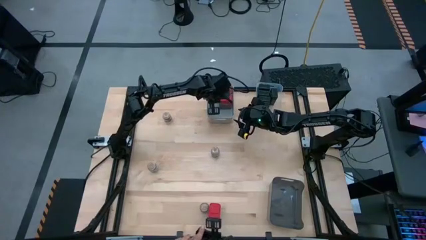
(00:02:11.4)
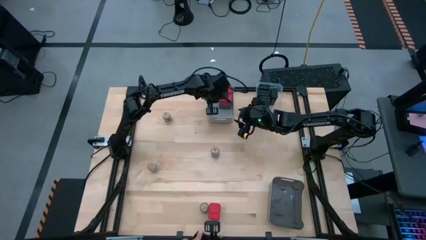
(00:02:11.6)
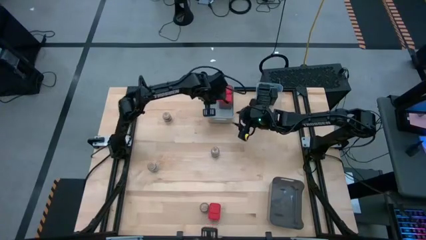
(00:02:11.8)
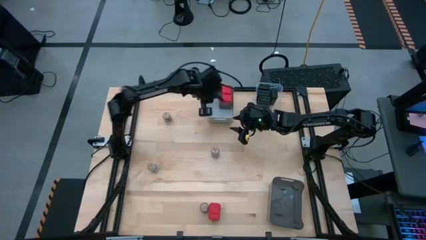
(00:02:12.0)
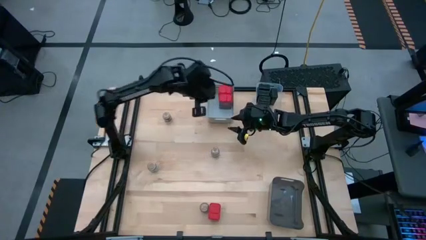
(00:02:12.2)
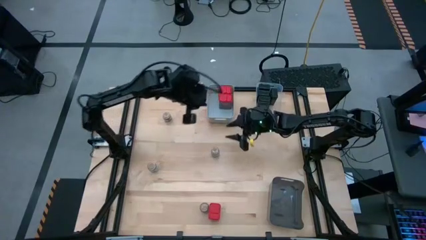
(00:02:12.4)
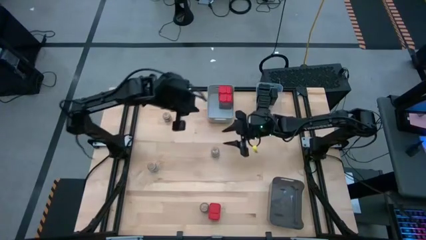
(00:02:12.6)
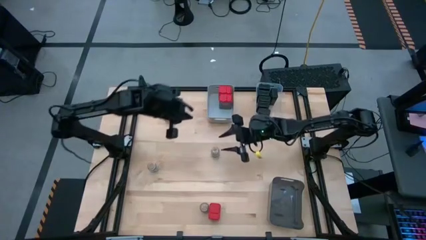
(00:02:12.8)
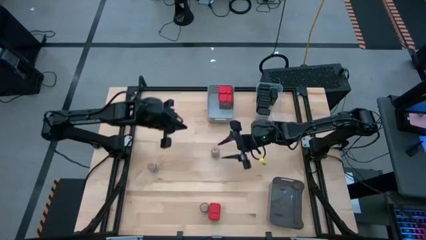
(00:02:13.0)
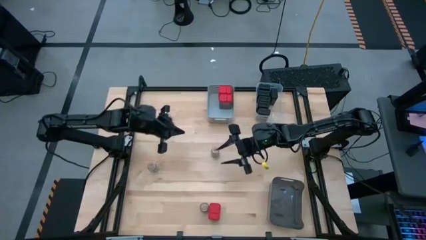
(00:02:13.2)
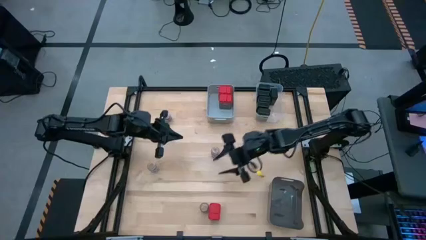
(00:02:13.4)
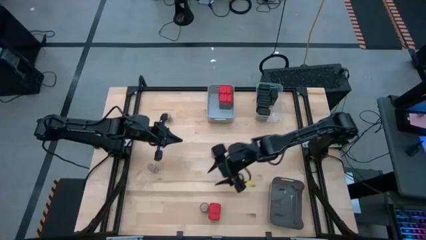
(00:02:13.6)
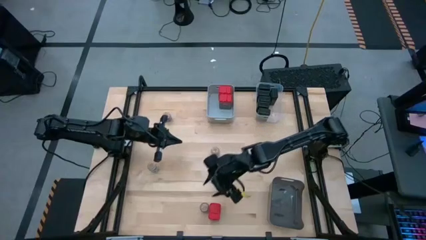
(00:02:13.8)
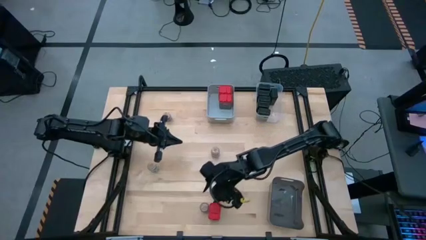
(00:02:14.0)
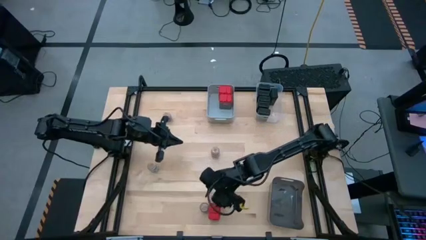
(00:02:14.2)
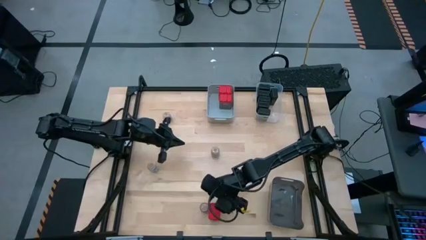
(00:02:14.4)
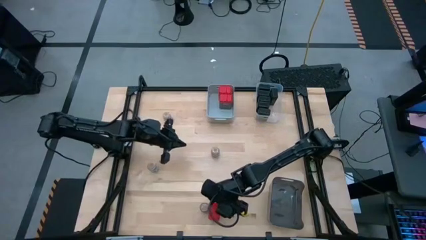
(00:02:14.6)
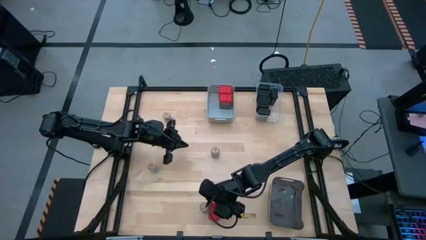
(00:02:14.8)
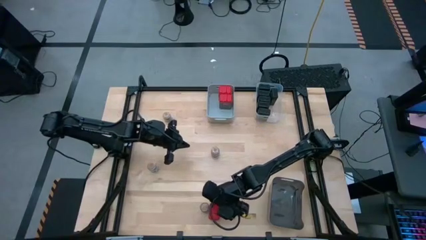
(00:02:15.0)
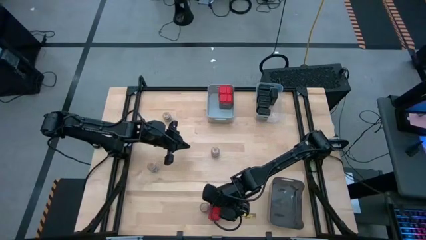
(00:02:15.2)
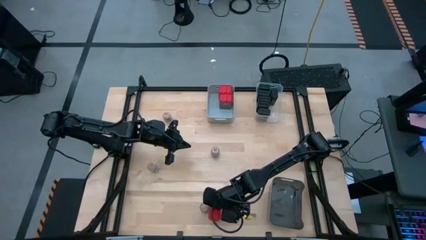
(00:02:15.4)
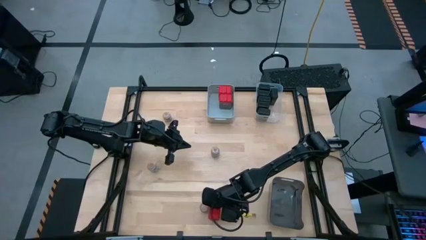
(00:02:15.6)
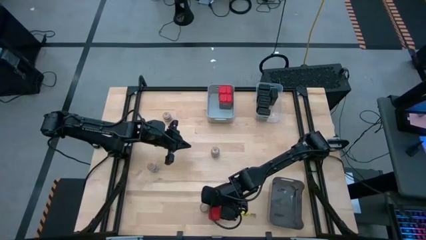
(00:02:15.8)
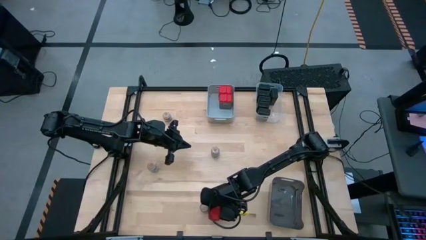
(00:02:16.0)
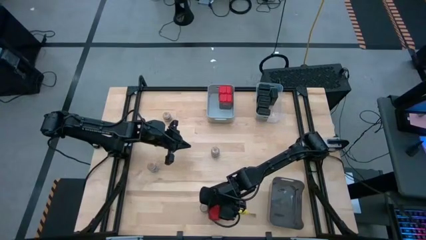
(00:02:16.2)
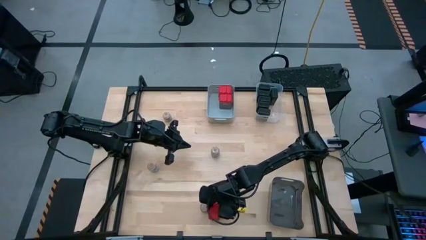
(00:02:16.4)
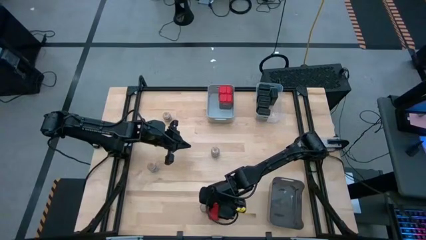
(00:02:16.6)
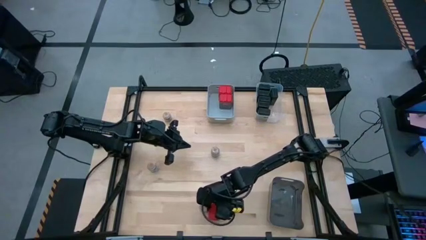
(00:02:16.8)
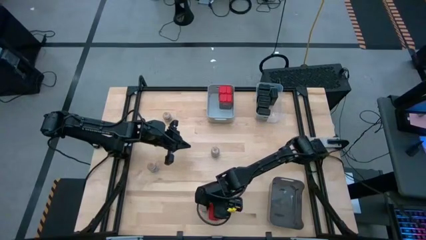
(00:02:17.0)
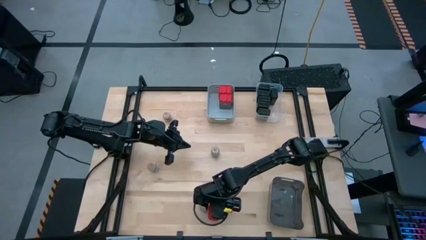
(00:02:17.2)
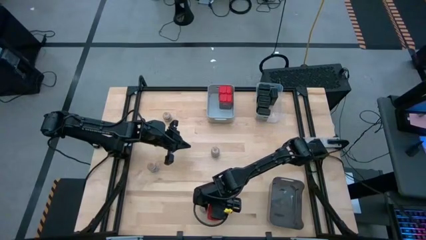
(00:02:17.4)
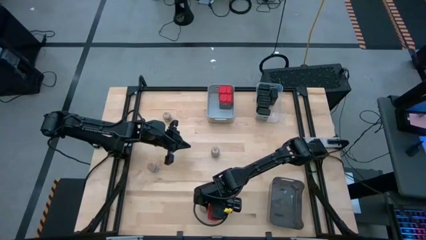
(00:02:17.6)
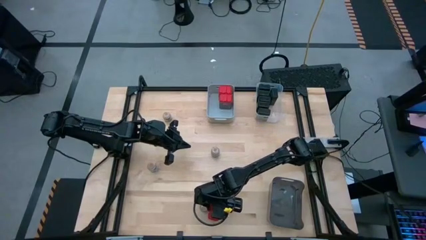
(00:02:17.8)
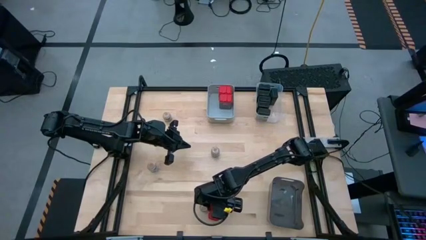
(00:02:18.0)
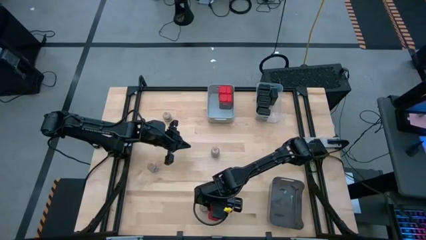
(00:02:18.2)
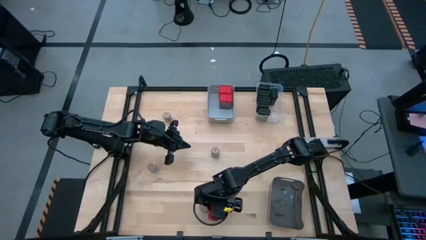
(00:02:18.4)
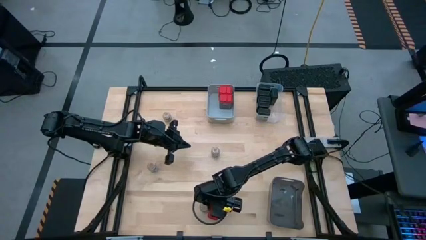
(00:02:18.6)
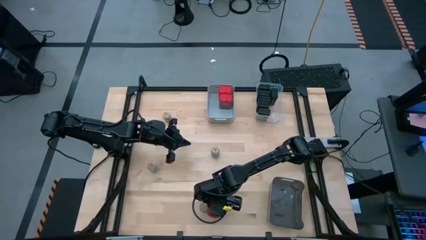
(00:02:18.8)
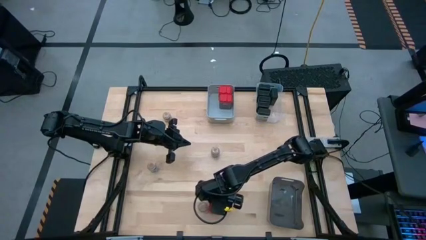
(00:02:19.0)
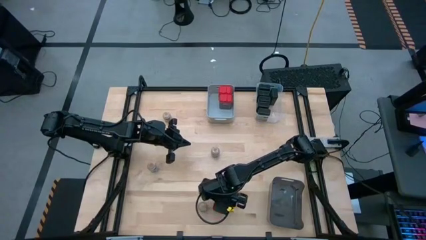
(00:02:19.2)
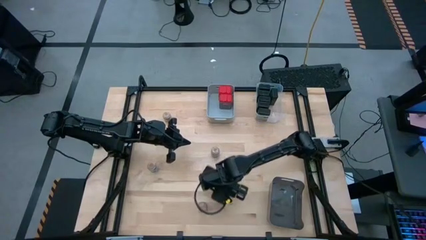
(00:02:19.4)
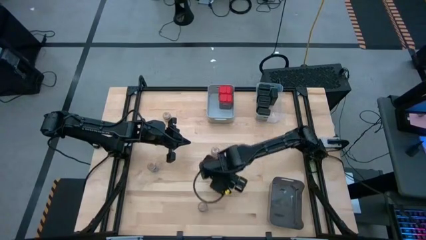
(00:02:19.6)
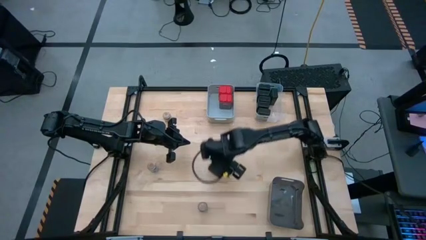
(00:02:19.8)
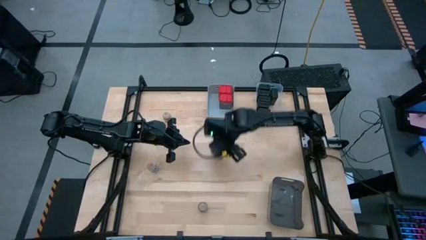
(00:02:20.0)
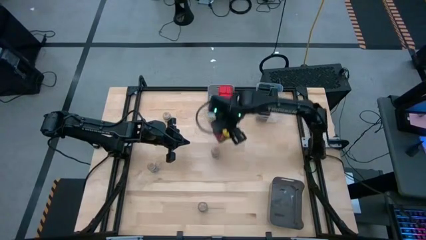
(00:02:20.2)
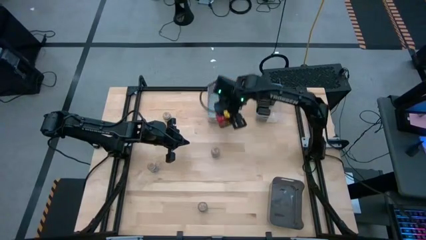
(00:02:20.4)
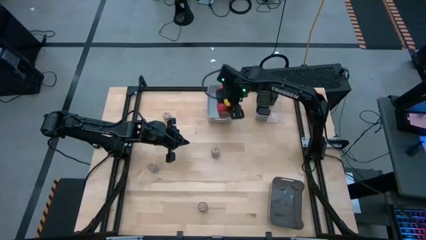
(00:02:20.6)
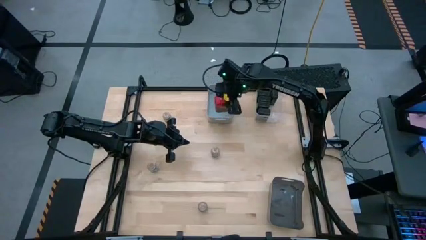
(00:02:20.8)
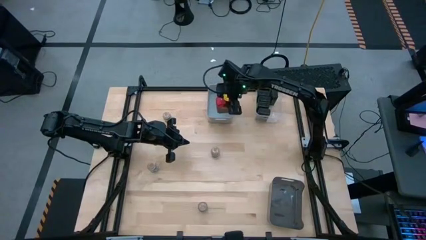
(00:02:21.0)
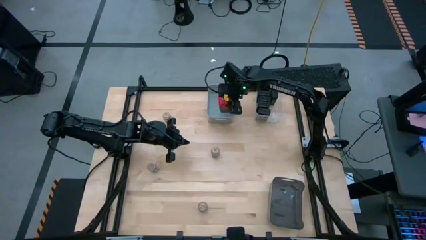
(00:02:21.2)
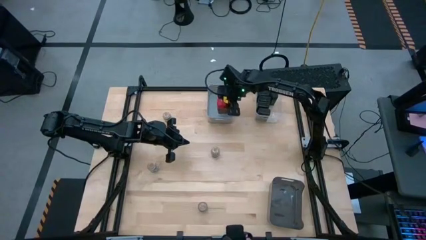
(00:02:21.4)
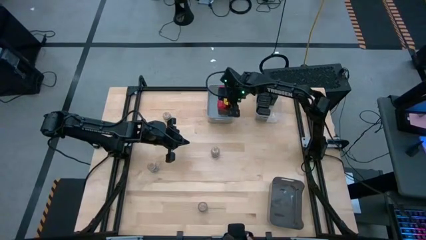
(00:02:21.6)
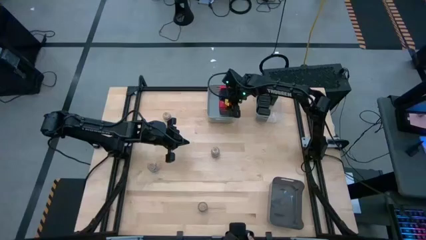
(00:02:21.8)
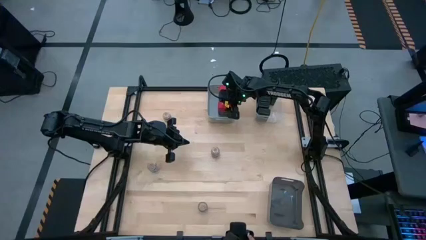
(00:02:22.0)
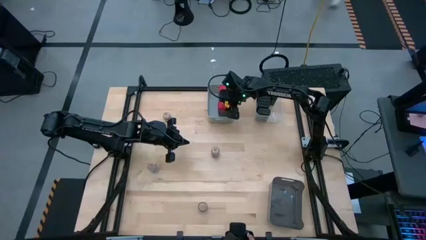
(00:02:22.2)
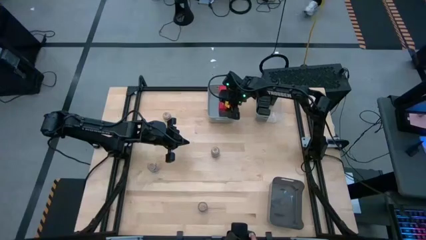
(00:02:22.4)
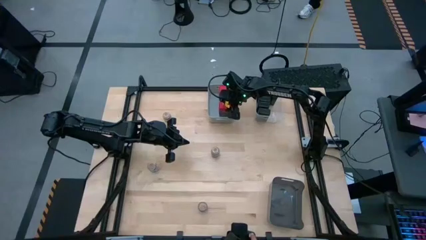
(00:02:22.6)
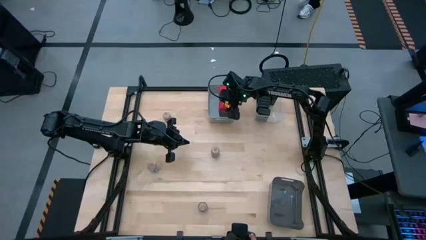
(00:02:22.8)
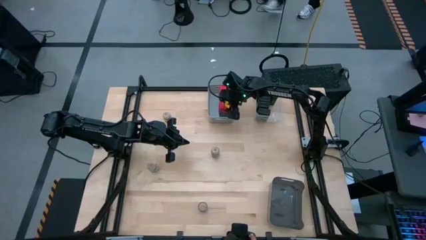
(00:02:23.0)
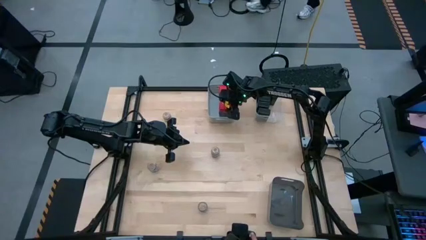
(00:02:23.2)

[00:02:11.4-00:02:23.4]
Task: Sort spices by type
Put the red seasoning can into the gray bin
